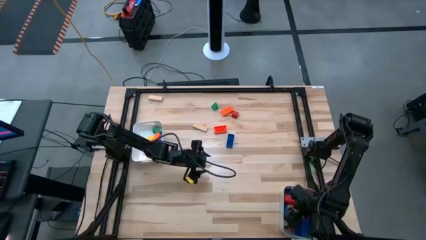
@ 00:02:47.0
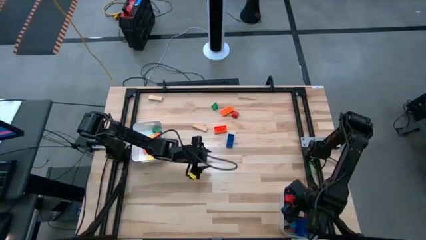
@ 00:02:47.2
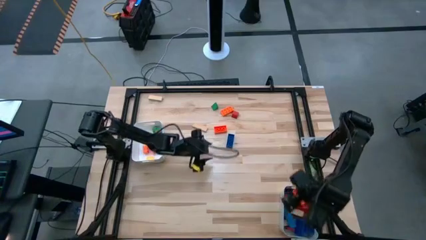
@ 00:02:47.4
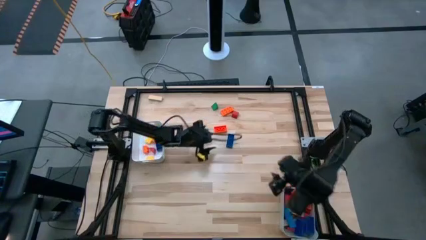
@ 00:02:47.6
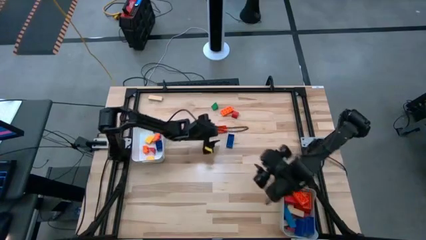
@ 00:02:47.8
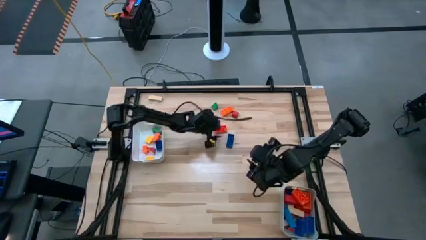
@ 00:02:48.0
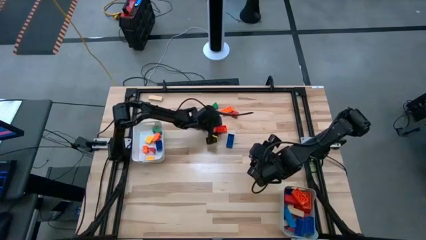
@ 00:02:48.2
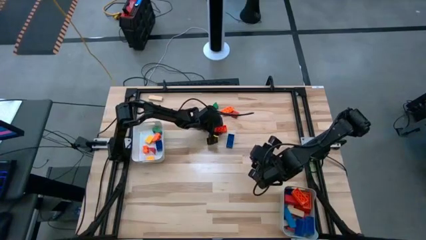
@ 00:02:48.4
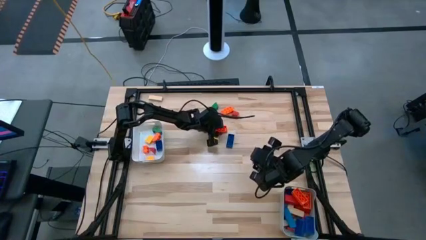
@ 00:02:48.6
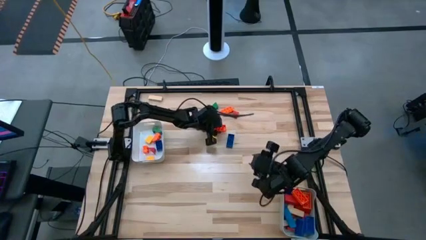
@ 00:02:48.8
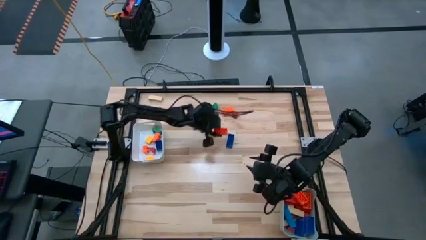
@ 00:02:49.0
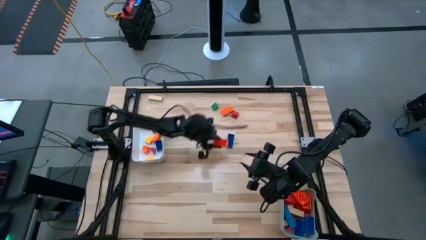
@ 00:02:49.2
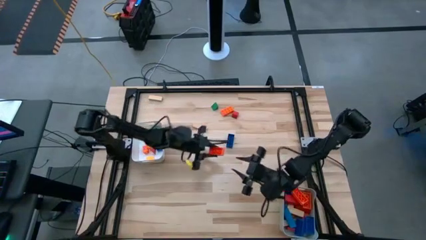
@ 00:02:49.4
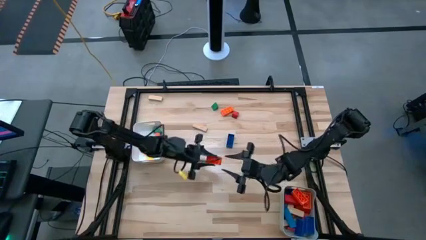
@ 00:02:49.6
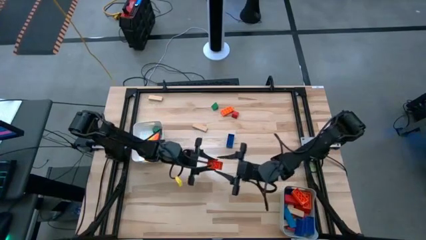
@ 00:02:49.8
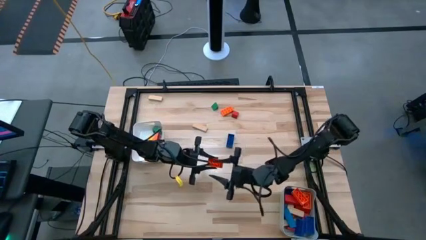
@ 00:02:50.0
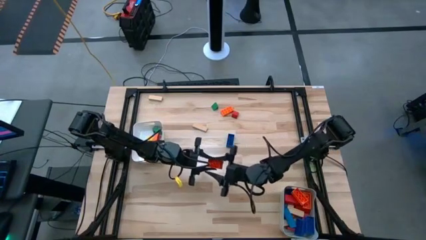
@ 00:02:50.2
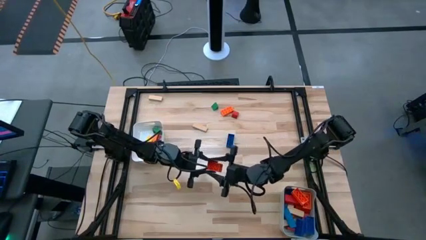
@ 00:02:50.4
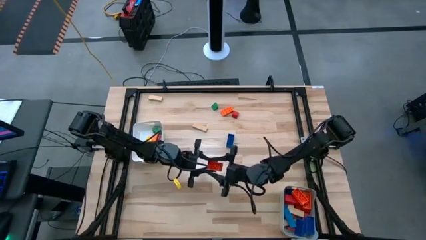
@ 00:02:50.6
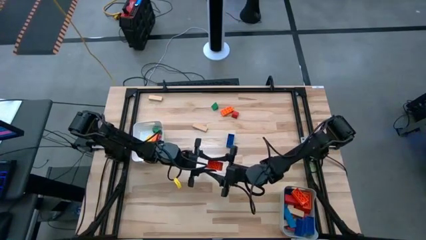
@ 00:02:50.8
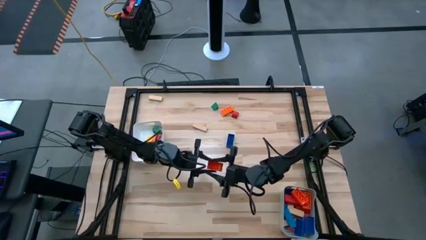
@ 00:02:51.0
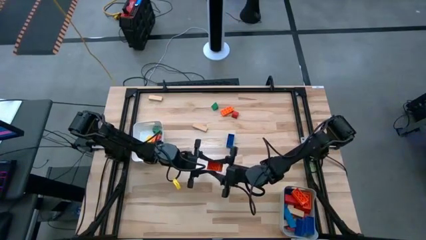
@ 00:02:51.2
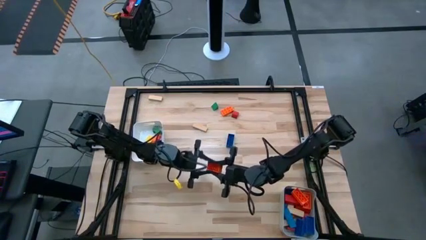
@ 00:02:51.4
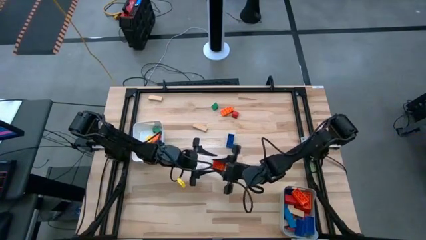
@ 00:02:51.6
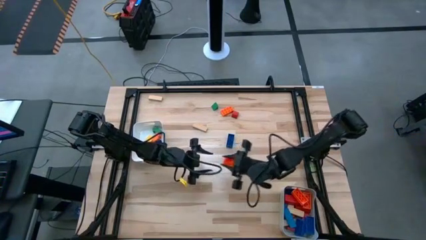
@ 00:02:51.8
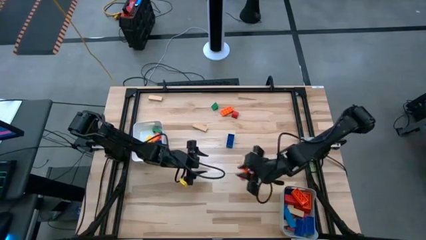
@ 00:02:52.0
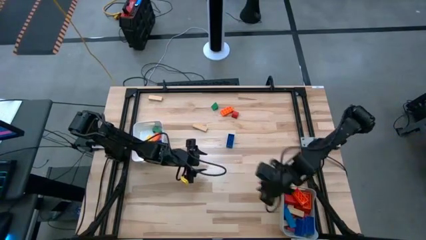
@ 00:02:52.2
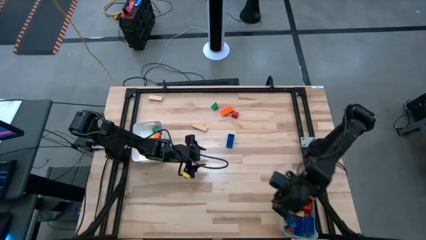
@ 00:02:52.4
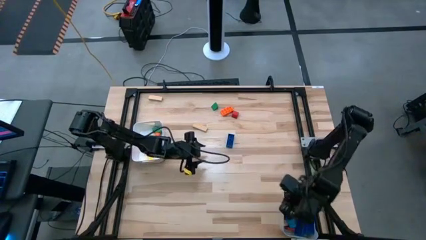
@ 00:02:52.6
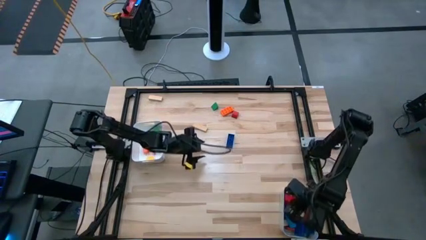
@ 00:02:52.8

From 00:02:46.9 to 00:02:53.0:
Task: Sort blocks by size
Put the orange large game piece into the gray bin

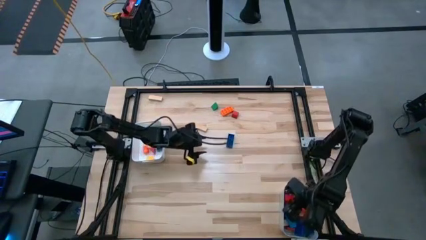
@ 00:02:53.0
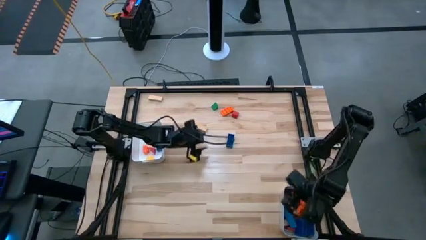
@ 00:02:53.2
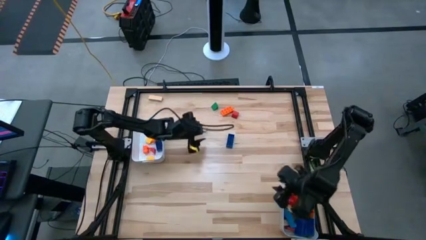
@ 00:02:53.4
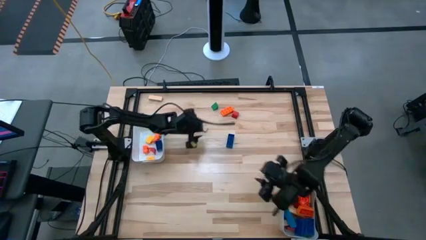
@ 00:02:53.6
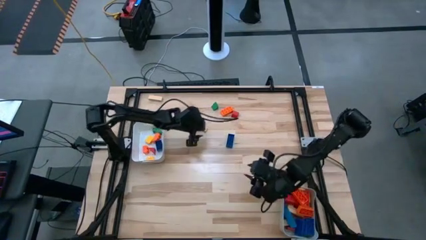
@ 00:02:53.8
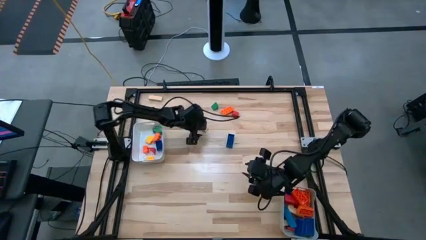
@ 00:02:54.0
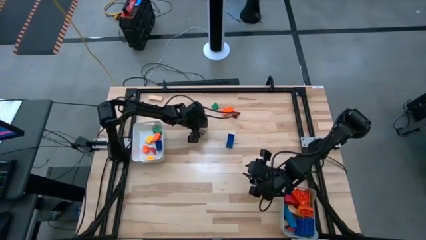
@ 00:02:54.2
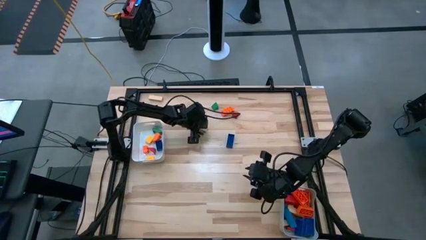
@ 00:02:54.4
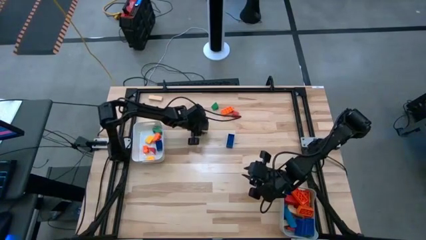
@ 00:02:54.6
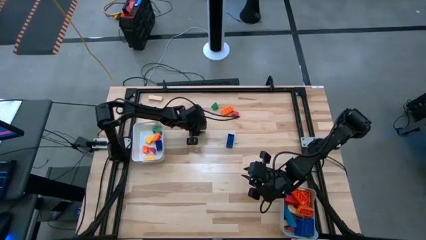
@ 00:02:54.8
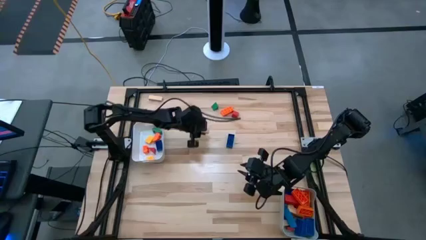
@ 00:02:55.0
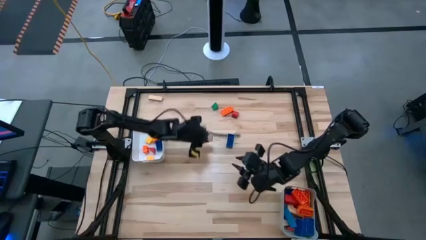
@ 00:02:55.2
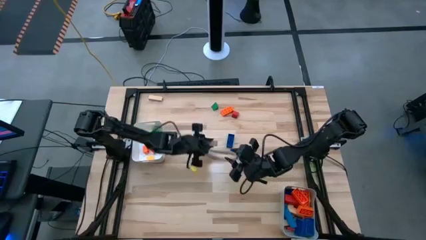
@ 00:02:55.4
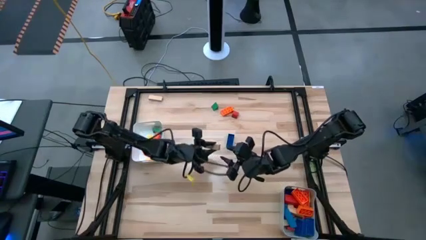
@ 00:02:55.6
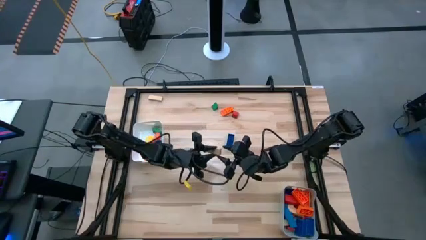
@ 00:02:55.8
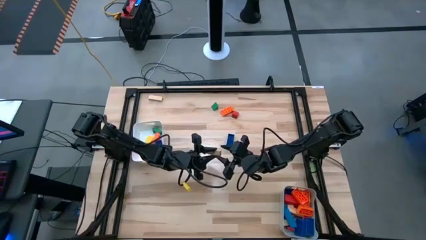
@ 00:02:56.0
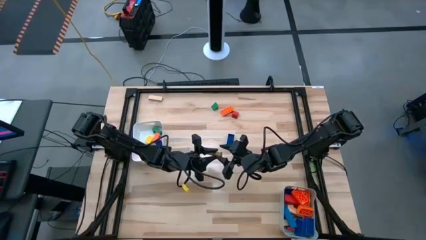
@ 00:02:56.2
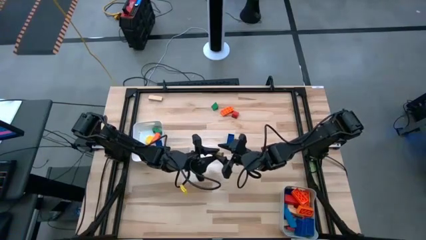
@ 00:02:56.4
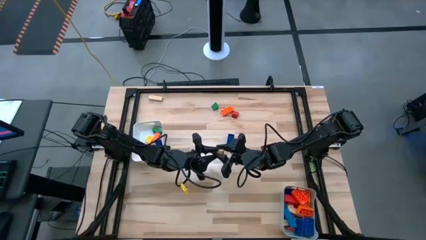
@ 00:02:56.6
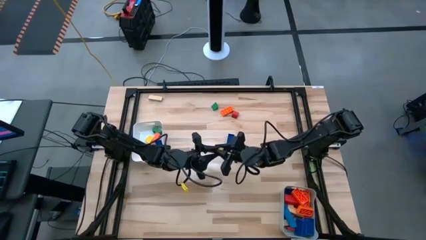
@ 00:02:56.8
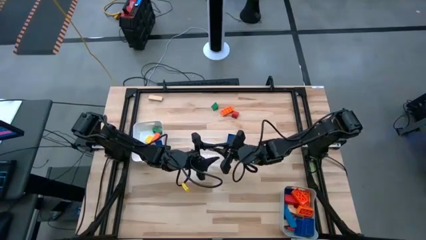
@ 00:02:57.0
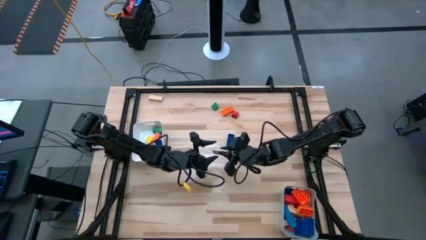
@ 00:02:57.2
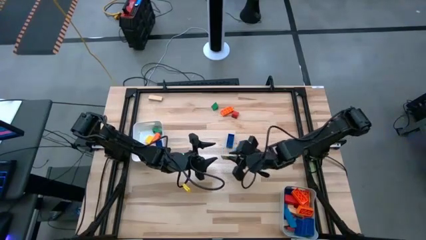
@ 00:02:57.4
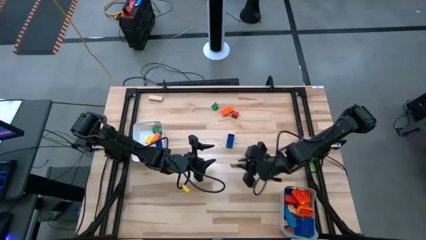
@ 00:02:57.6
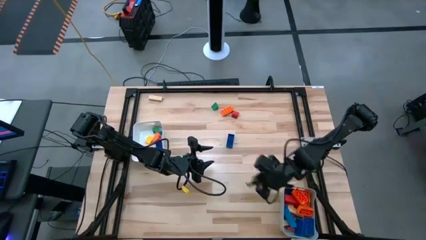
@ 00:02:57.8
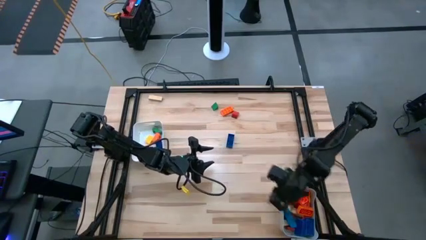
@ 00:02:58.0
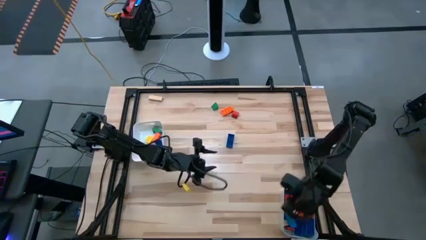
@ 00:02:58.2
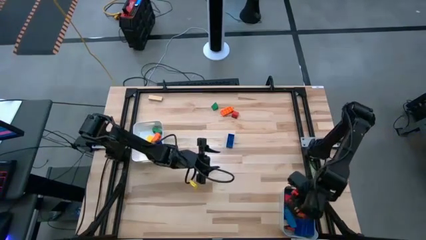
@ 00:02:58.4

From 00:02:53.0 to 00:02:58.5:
Put the brown large block into the gray bin

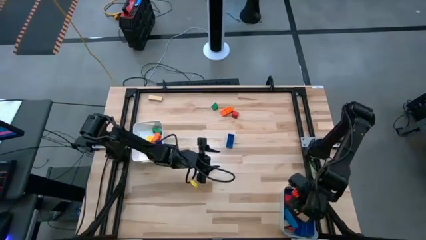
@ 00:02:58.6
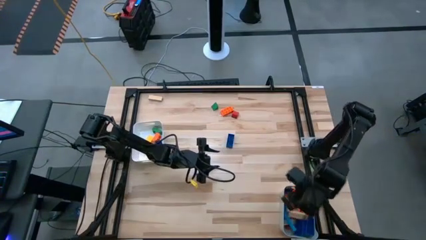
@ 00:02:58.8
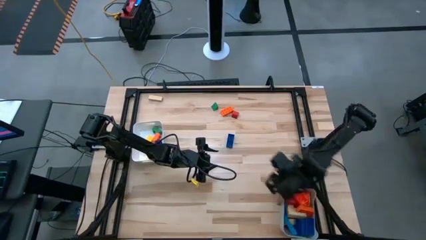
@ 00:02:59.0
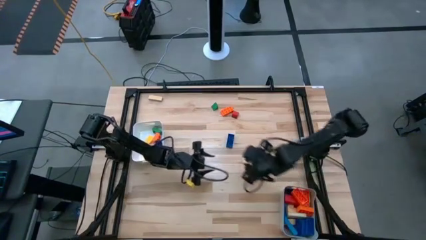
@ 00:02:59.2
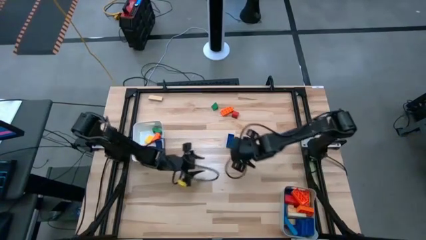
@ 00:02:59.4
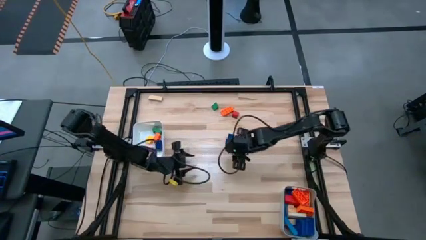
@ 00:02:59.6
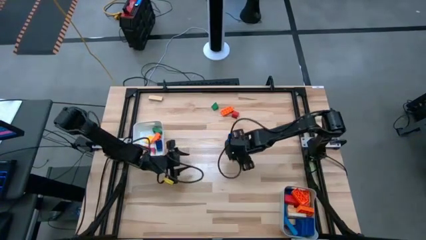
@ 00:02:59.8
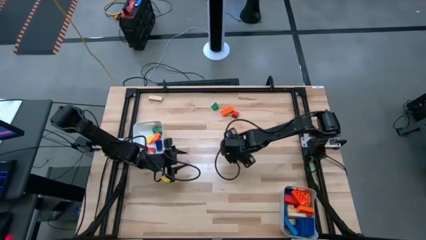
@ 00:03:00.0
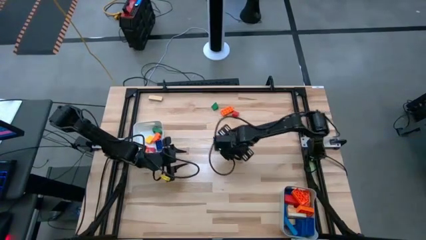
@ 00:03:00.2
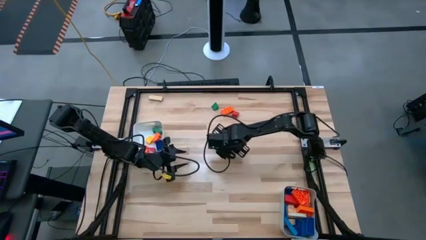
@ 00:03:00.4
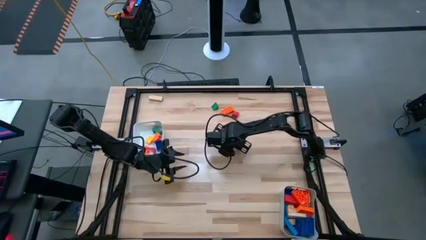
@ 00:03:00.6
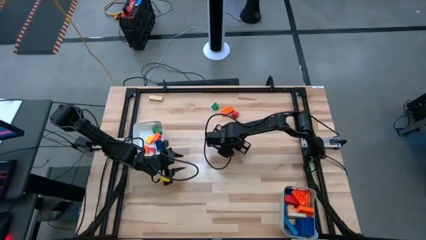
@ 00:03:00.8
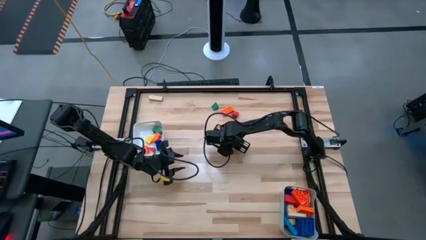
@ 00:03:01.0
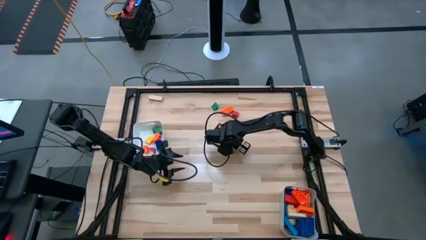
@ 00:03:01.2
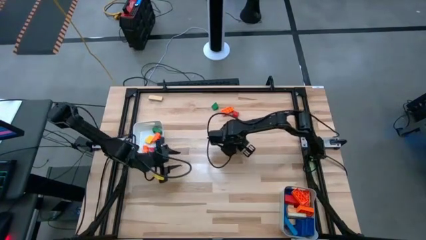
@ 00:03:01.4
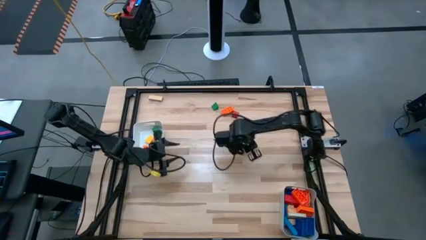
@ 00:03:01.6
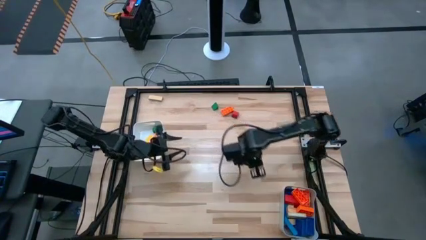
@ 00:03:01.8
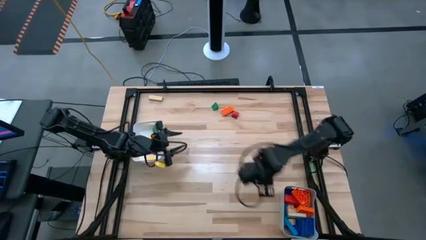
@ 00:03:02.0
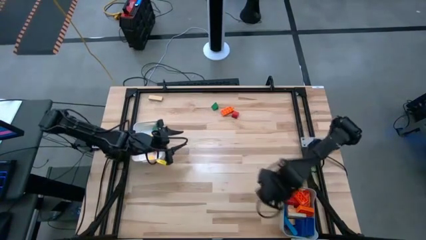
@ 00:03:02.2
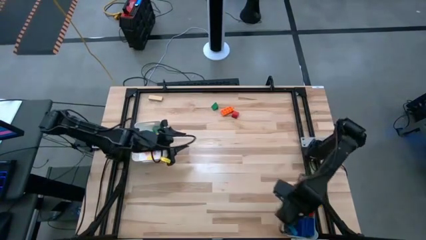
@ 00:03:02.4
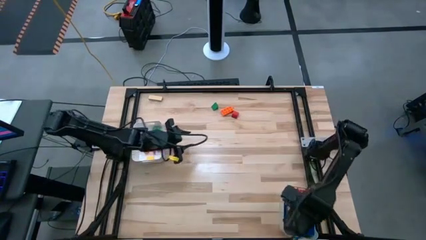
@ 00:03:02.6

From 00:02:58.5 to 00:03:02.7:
Put the blue large game piece into the gray bin
